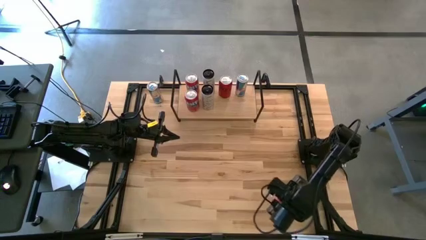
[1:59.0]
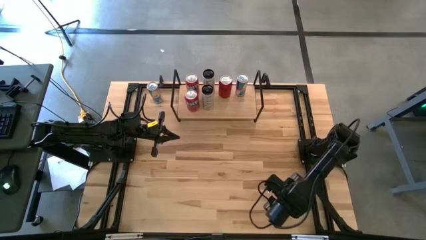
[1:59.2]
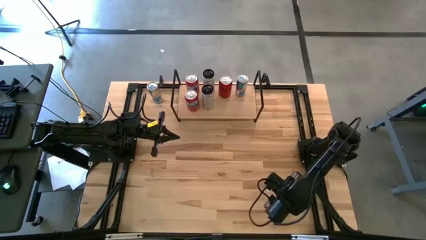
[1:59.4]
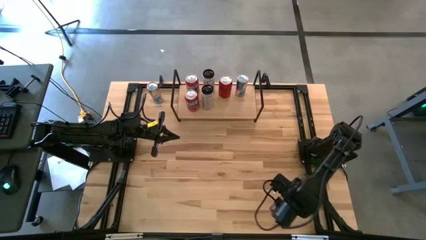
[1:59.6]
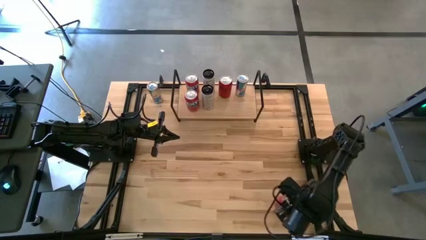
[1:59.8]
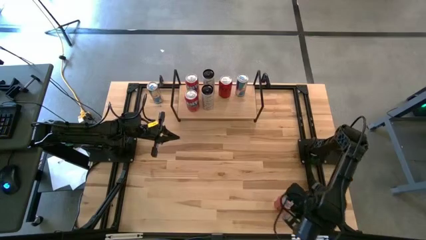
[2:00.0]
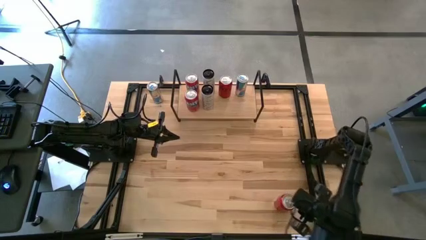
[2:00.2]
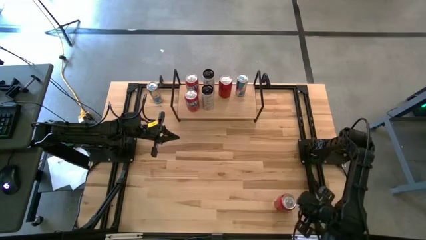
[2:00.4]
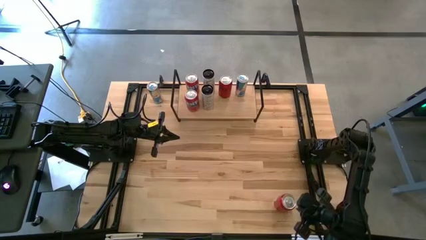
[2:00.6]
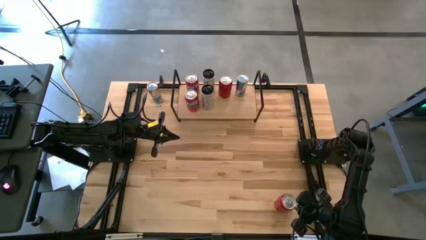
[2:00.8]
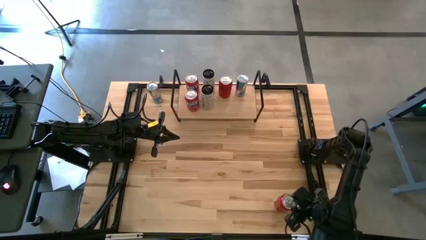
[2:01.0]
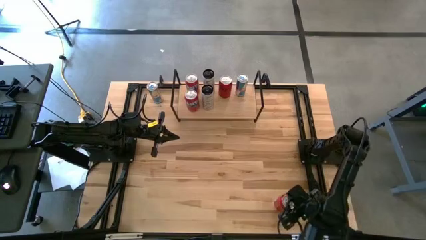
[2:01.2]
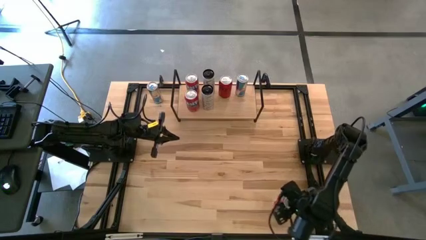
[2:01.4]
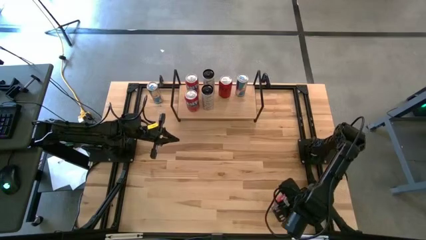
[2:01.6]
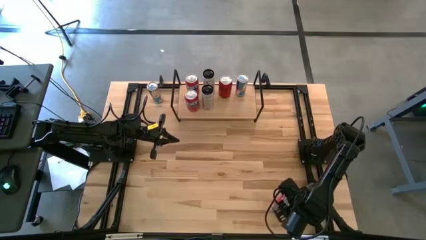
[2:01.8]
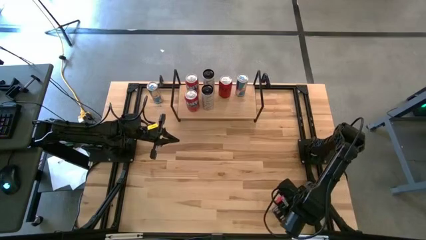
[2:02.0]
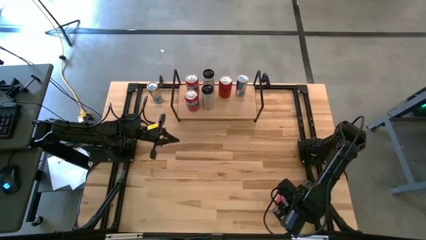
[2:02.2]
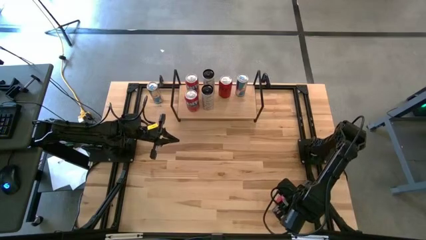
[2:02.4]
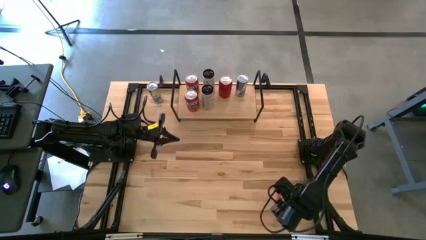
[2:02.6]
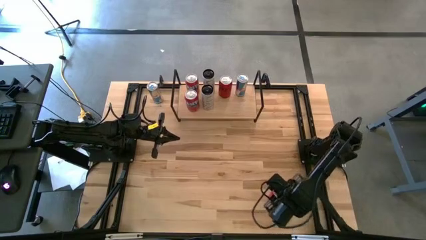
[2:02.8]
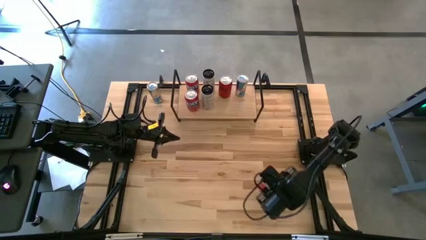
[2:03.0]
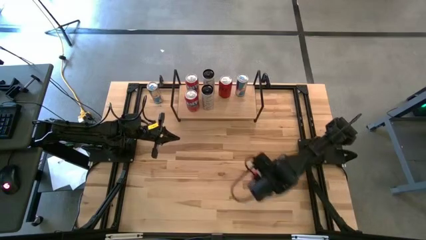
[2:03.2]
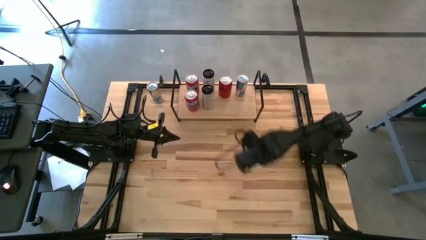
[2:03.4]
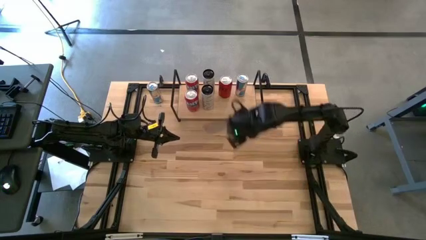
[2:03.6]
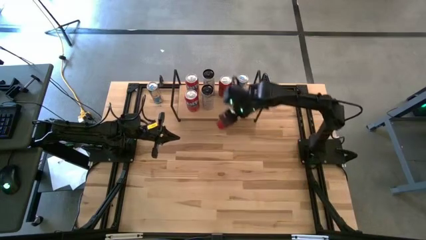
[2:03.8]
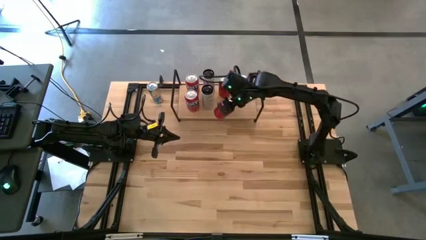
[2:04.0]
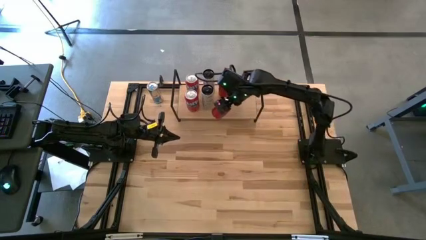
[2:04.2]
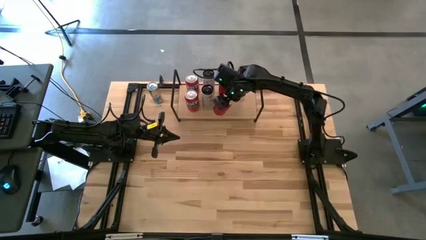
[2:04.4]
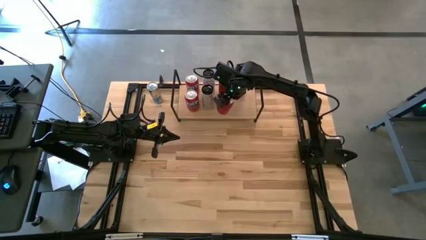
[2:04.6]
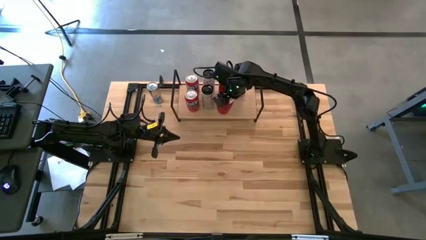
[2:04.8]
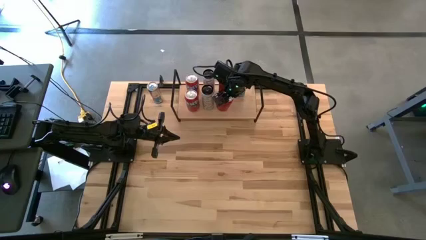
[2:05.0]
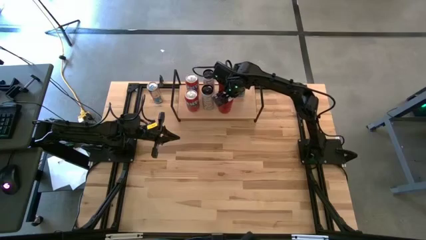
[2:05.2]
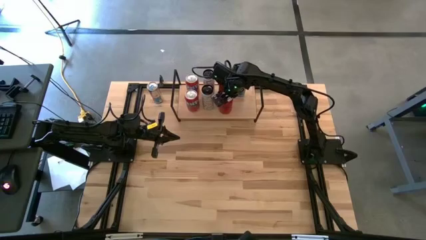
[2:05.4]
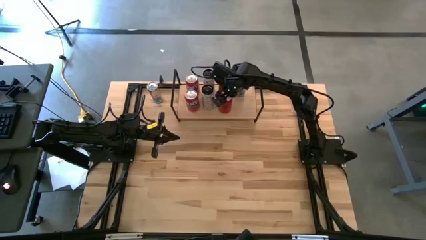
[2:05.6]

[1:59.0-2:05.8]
Task: Place canned beverage on shelf
Put the red black soda can on the shelf aligned with the red black soda can

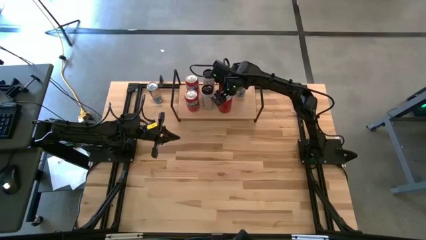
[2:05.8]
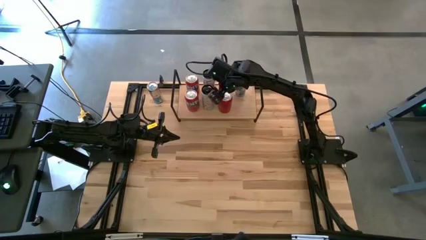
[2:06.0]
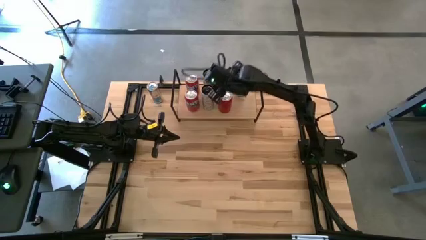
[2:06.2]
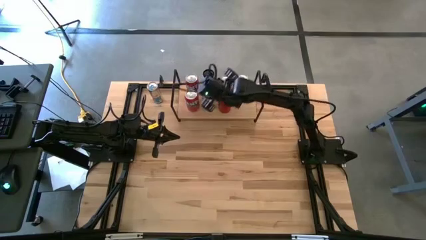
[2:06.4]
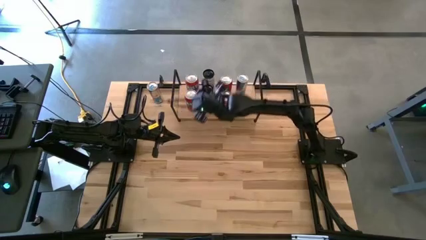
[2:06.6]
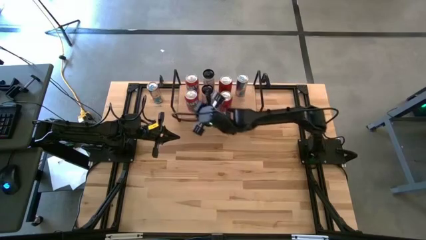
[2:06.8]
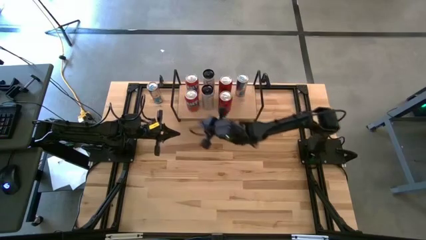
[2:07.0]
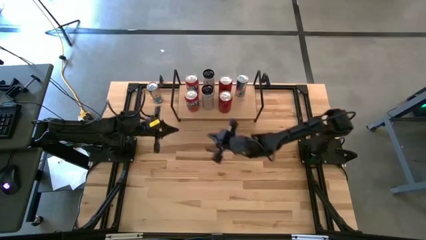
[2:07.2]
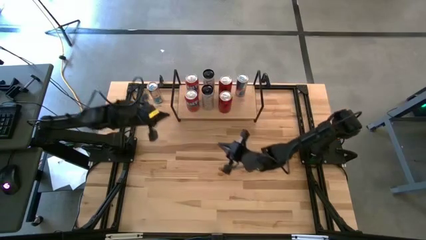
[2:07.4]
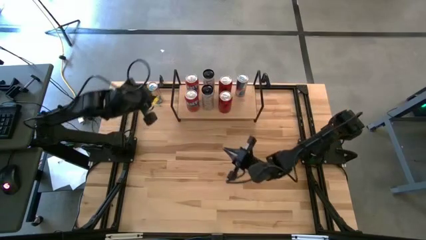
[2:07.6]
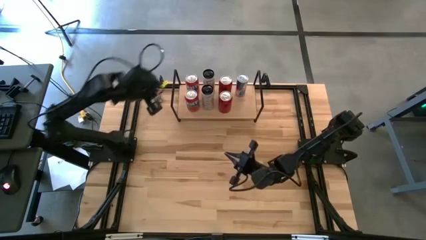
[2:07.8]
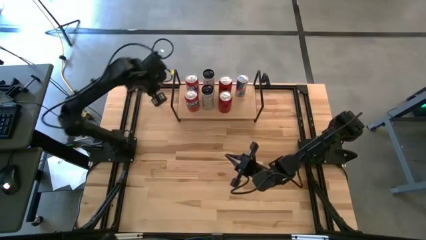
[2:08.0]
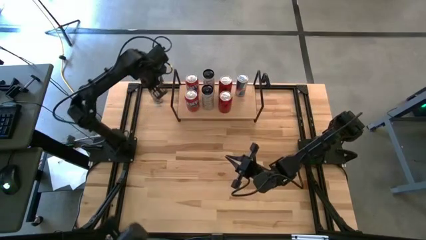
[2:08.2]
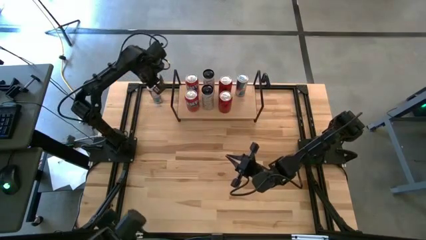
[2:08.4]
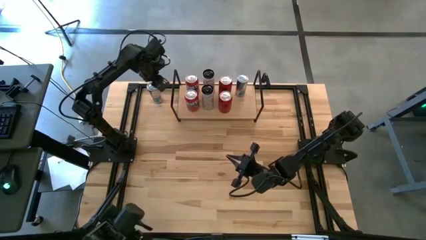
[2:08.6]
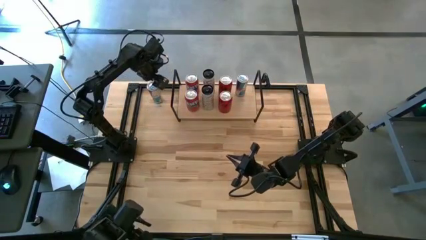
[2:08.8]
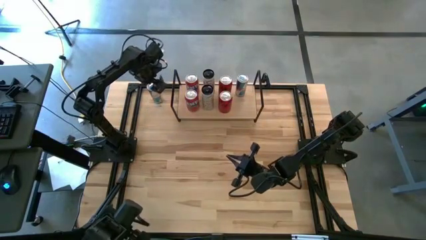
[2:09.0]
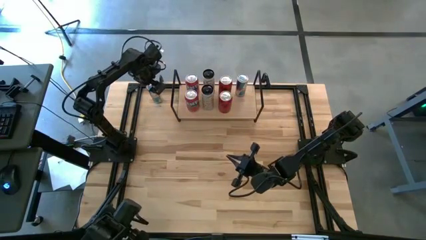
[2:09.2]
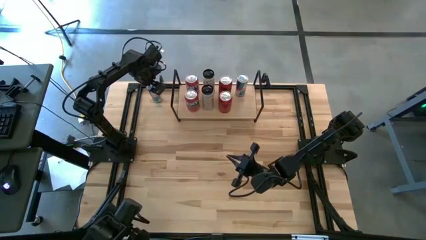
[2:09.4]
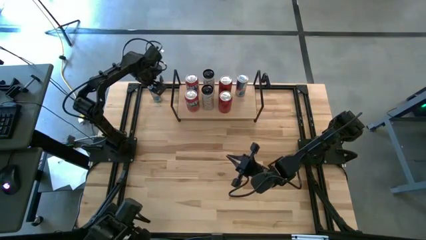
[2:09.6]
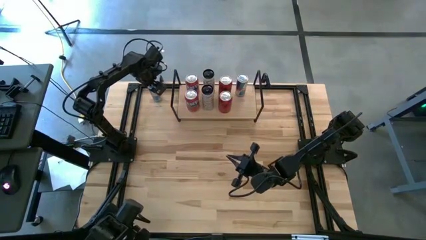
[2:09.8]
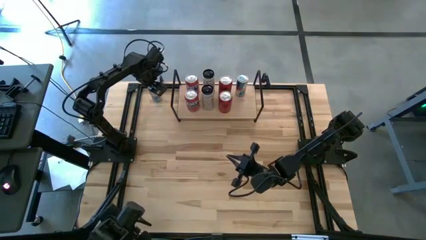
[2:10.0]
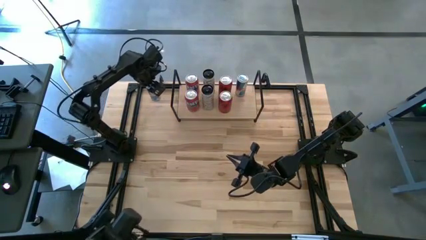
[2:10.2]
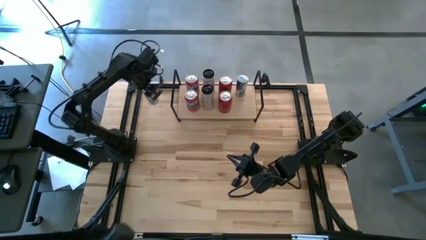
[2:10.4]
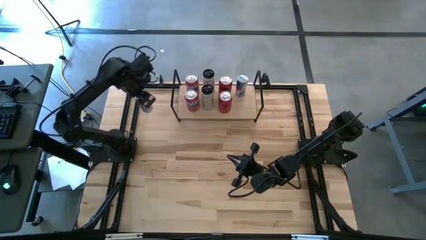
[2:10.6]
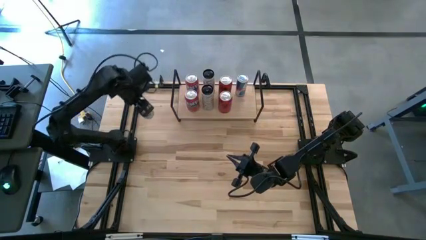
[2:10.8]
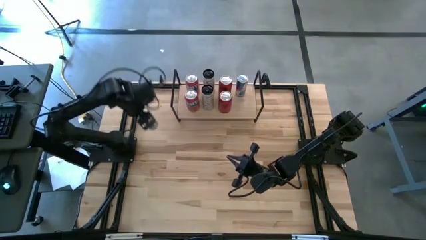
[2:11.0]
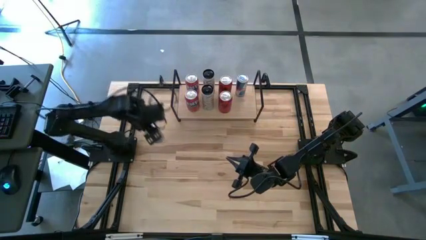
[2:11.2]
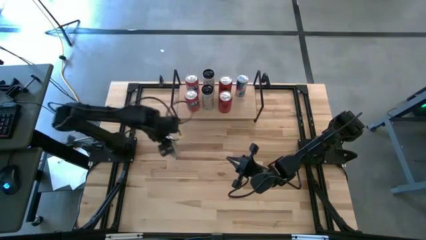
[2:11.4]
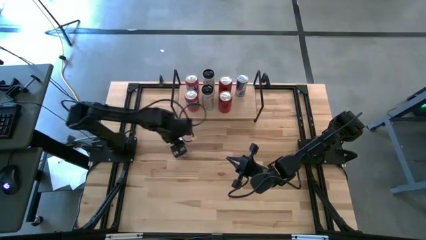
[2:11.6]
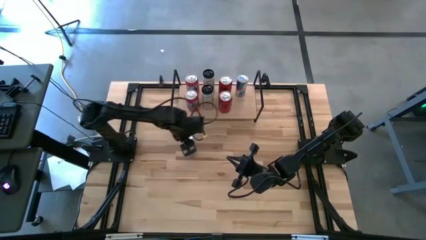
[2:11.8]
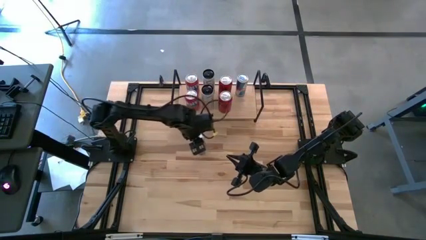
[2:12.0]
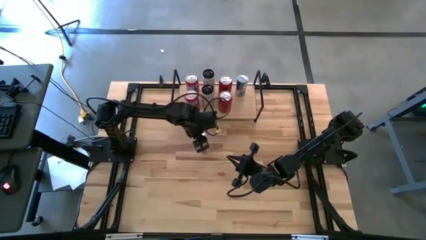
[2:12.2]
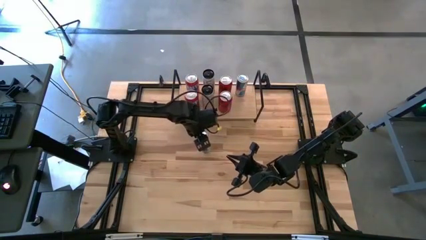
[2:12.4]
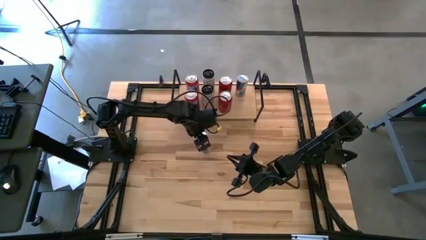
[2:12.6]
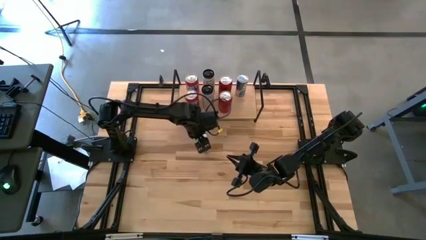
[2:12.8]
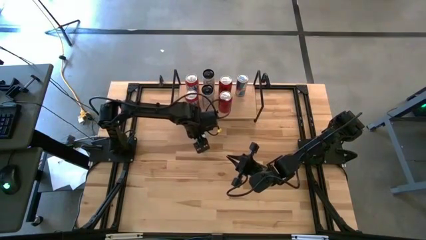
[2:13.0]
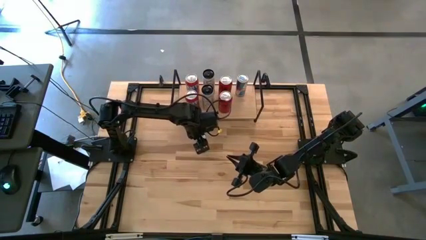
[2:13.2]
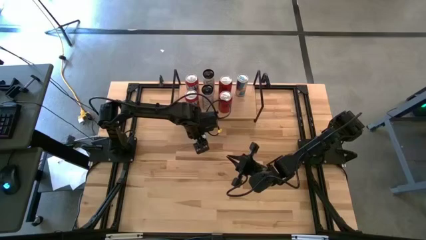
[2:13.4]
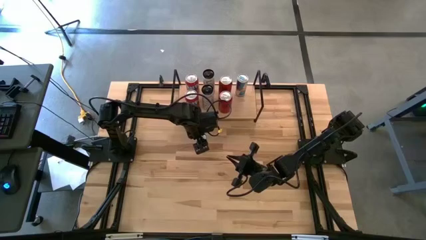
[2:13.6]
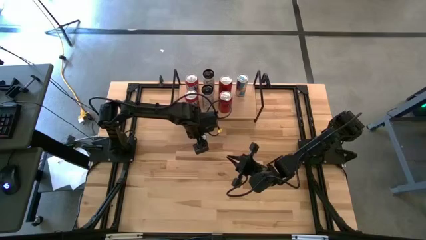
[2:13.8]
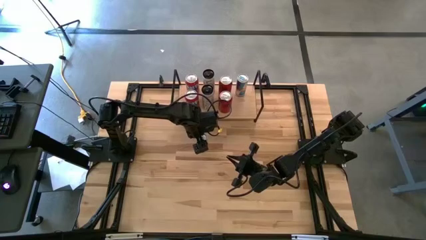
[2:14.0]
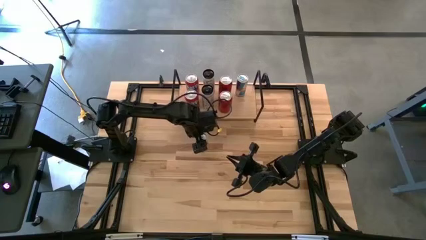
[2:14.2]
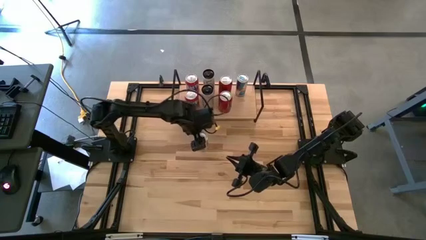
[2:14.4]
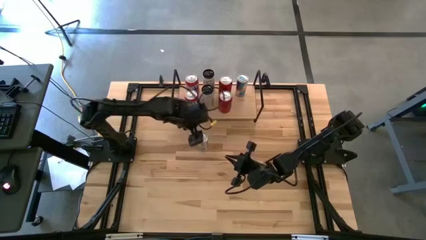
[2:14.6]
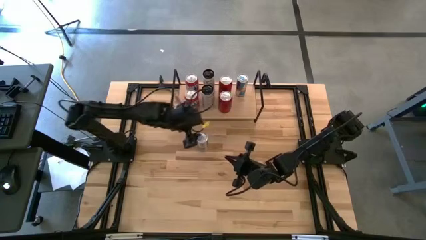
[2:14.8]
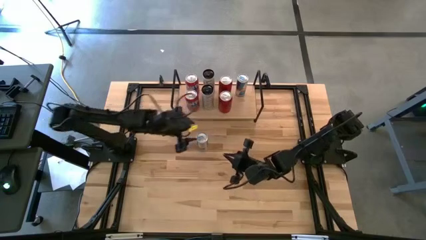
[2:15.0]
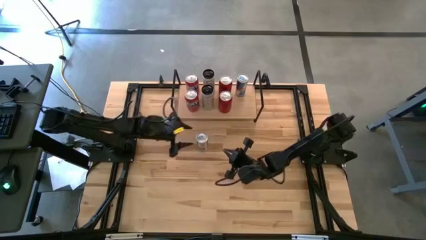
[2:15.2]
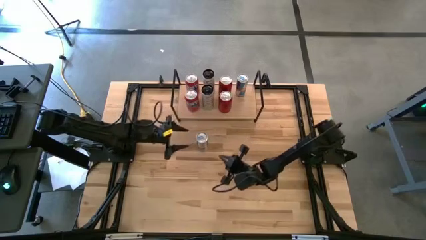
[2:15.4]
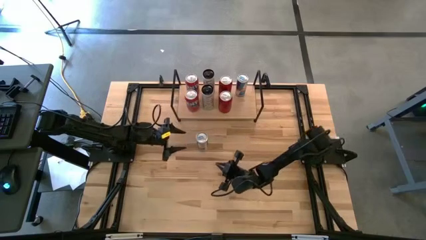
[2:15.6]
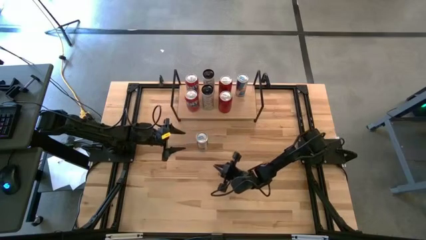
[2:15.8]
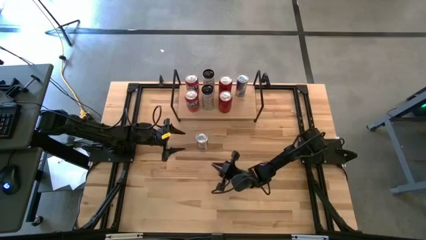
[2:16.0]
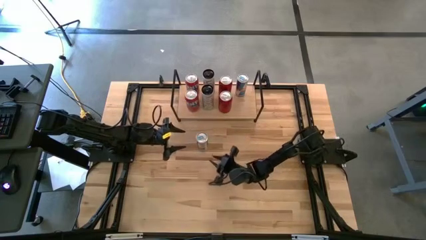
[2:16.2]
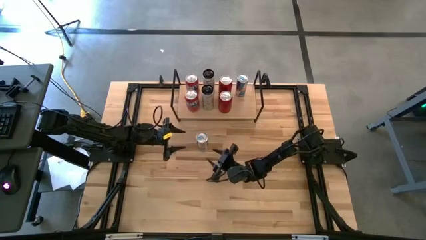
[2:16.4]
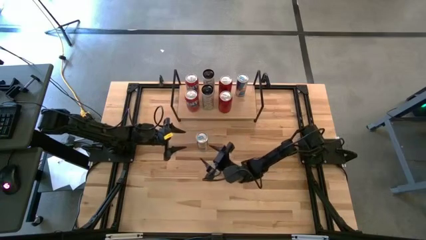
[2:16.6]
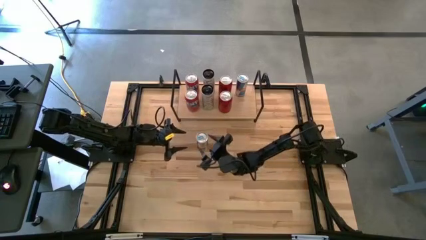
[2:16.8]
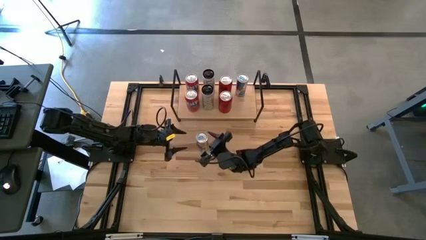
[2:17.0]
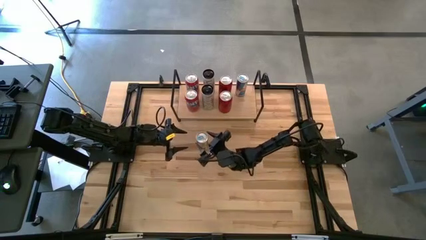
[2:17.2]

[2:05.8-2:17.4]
Put the blue soda can on the shelf aligned with the blue soda can
